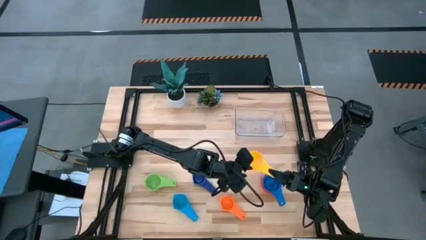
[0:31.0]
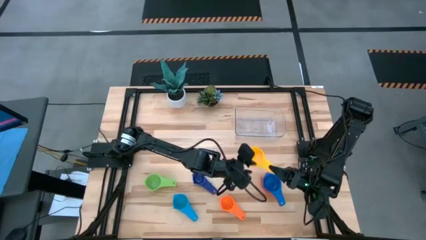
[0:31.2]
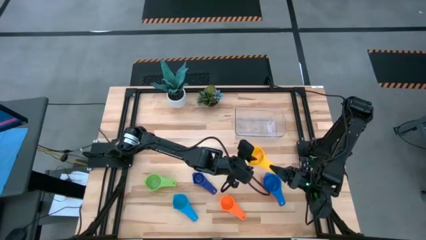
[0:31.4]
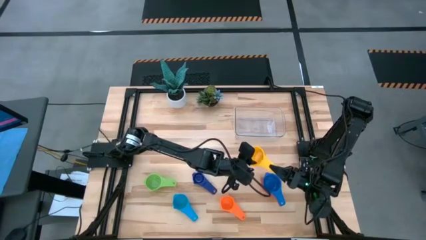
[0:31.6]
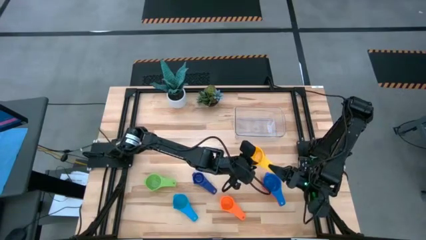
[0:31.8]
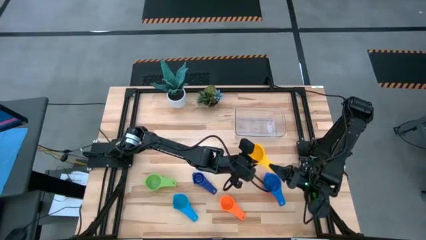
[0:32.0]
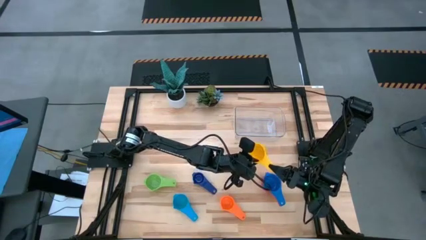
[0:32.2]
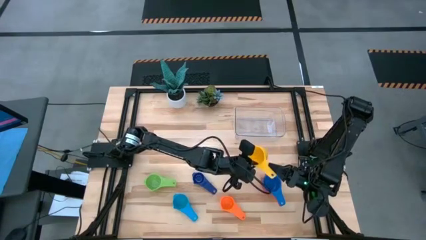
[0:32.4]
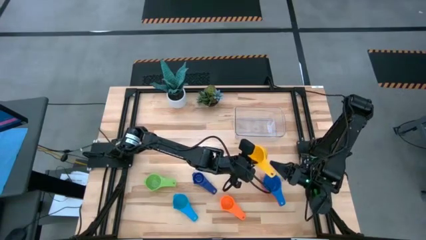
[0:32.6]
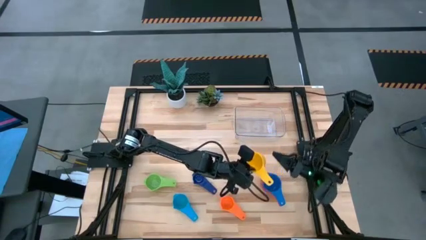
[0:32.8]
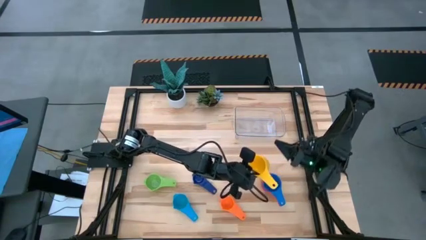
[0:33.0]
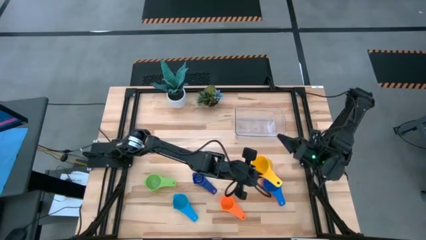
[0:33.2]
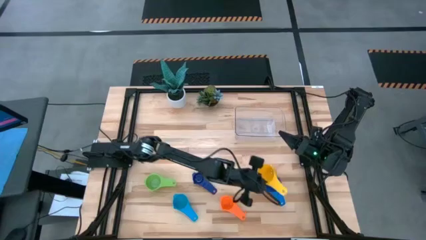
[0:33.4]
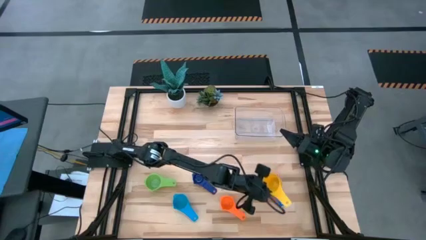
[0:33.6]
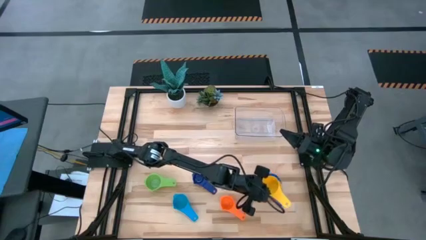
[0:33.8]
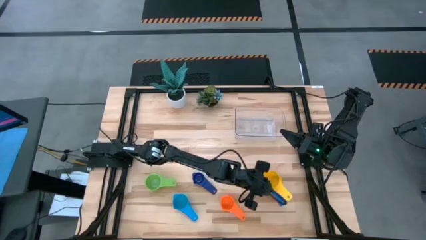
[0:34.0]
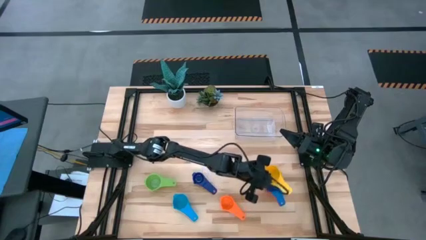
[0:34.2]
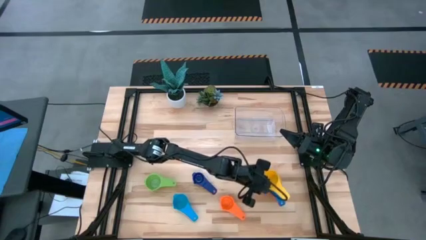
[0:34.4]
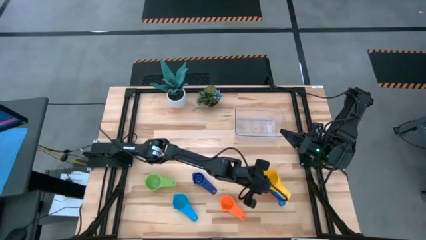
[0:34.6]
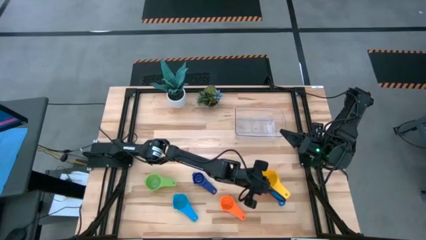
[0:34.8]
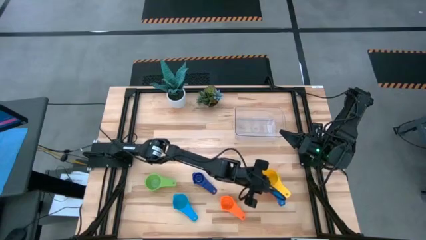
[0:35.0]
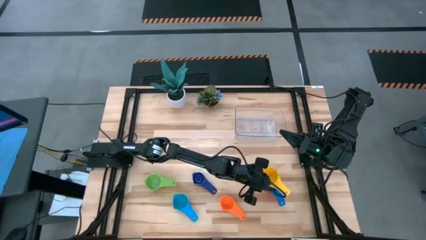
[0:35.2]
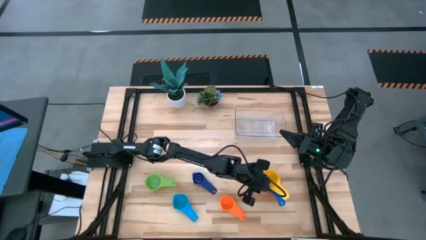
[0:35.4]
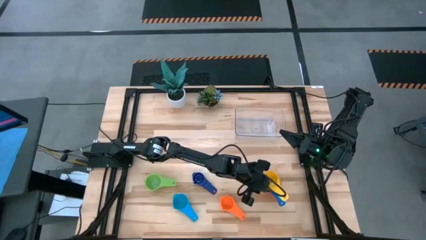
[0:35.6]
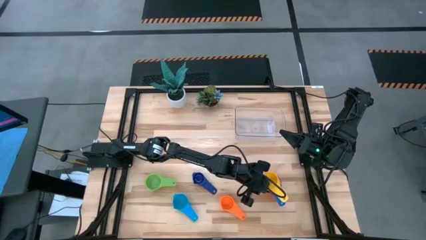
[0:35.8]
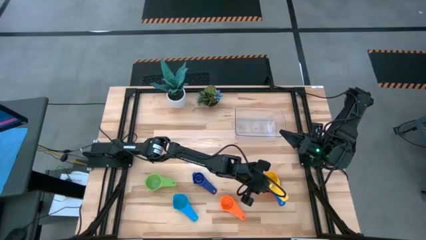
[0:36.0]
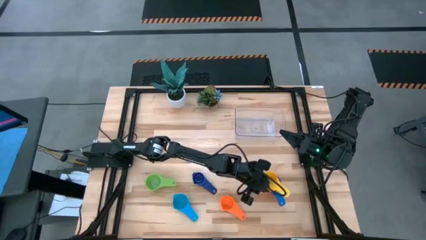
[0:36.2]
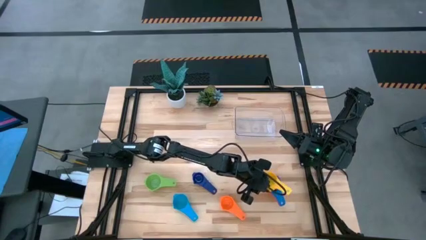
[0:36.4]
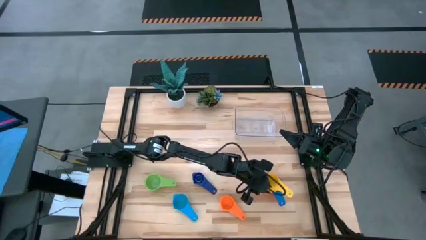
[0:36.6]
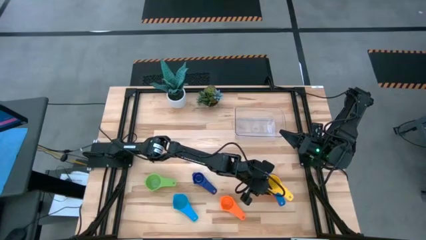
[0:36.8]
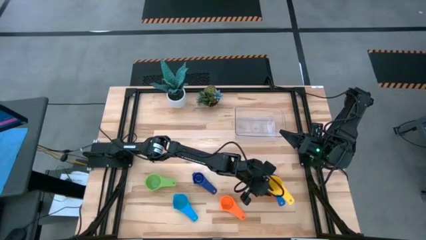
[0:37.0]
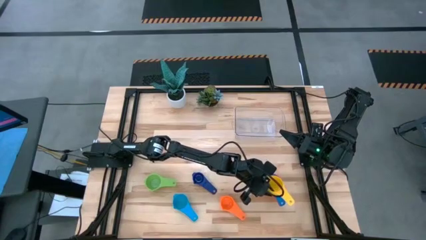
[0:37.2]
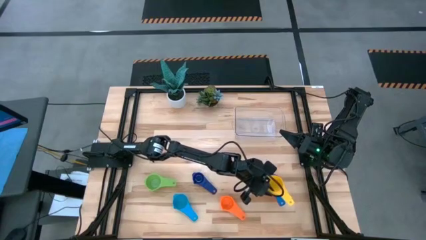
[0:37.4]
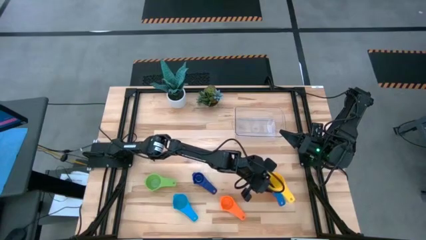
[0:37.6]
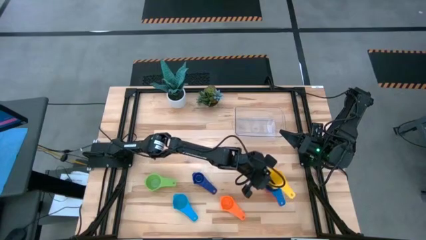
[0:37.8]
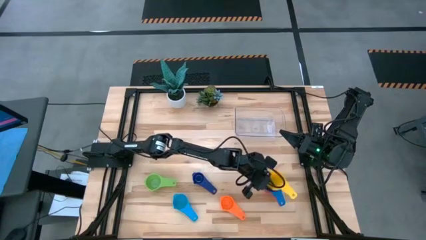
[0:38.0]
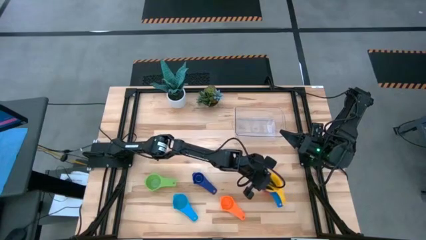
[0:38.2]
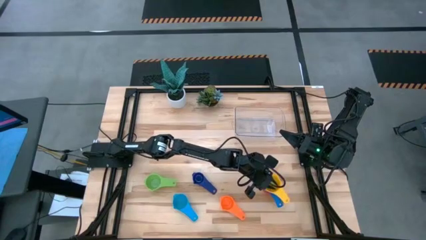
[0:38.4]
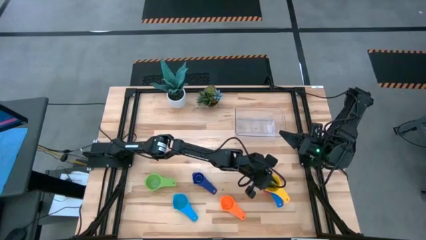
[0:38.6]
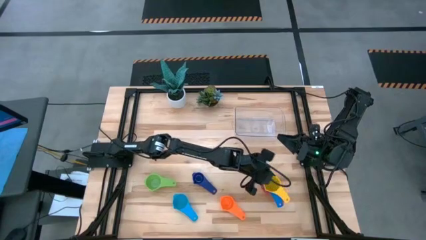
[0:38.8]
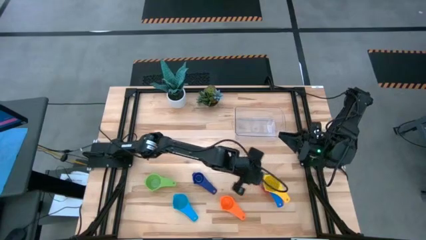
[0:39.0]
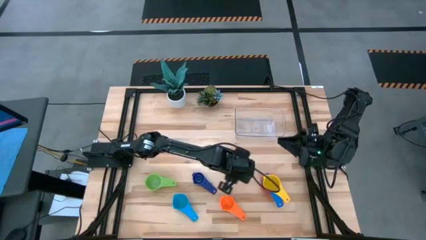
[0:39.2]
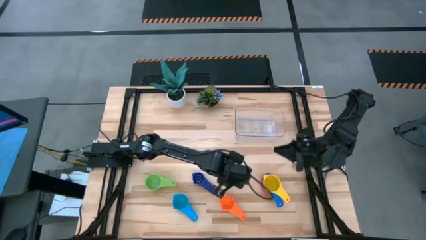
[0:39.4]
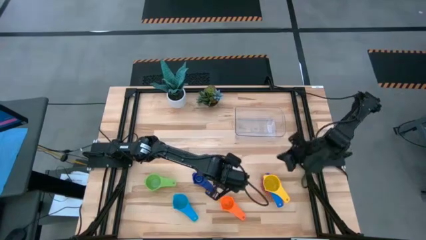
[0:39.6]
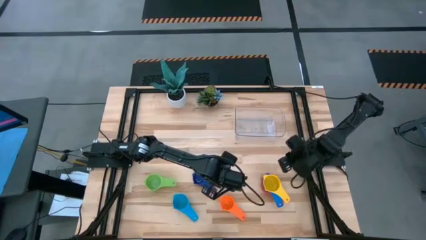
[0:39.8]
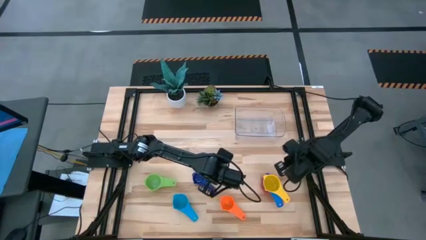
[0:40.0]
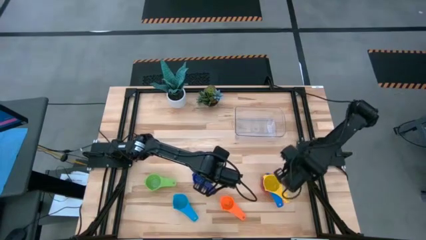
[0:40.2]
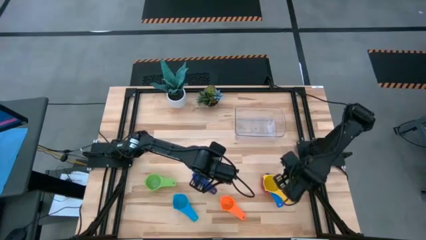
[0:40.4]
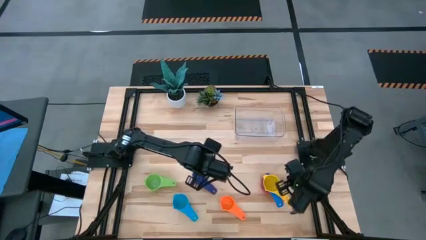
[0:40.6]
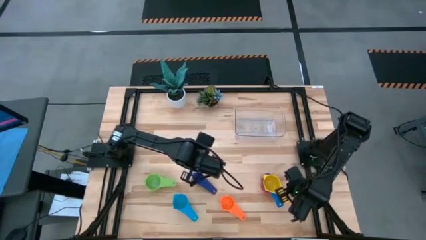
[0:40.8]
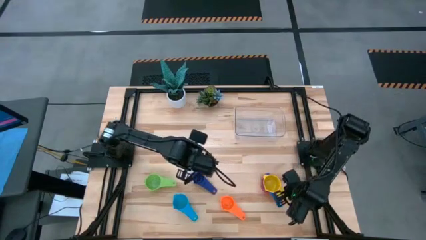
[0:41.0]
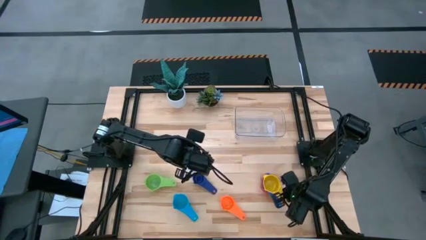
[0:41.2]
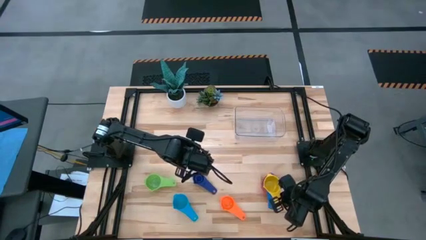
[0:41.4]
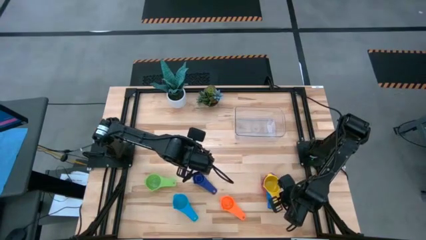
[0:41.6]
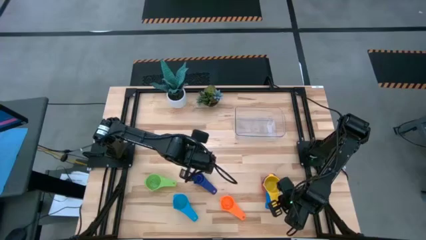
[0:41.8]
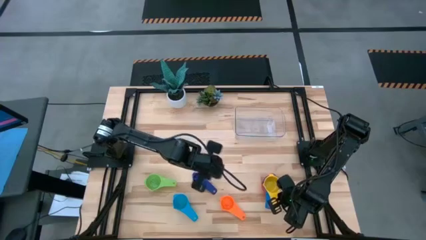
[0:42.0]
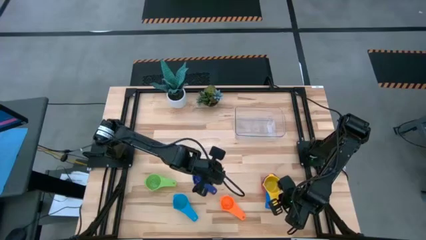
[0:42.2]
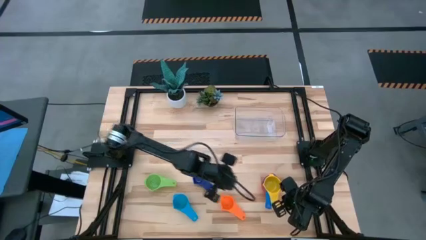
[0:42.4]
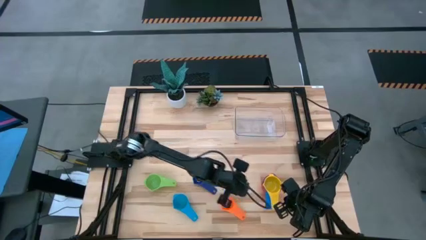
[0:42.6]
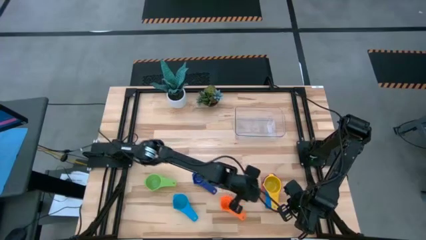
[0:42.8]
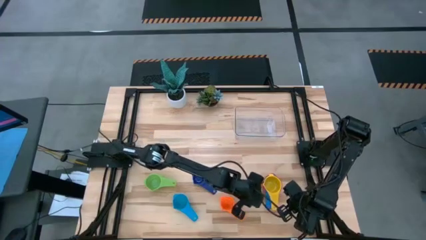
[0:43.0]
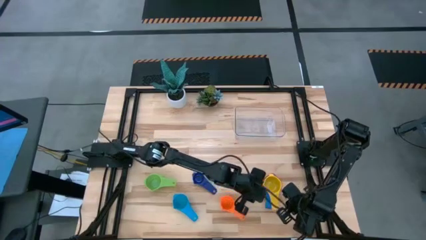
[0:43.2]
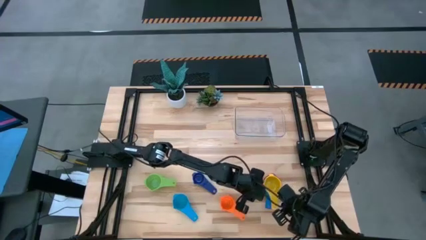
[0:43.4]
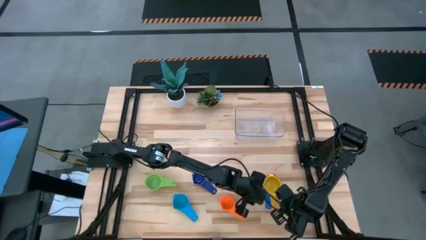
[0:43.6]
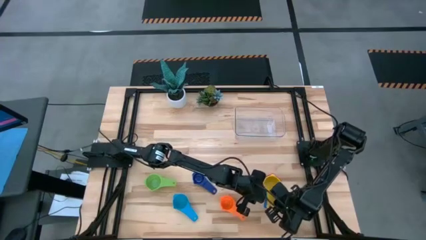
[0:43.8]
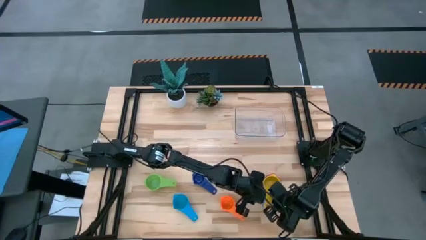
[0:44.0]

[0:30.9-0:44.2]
Task: Nest measuring cups in basket
Stack the yellow nest measuring cup on the blue nest measuring cup

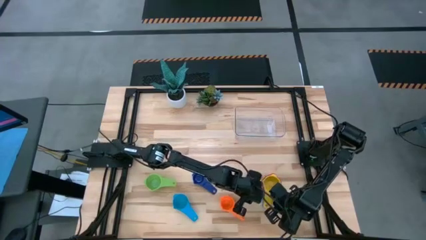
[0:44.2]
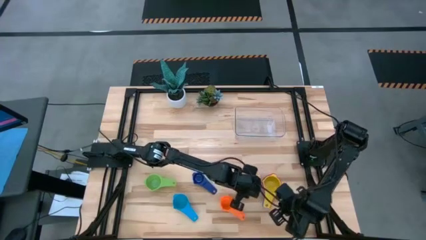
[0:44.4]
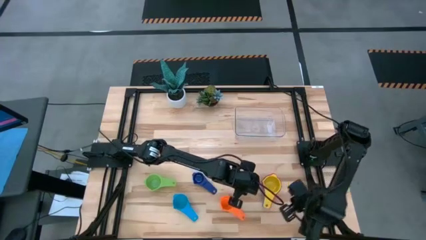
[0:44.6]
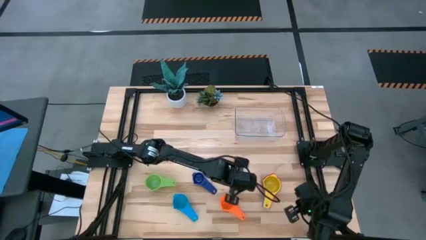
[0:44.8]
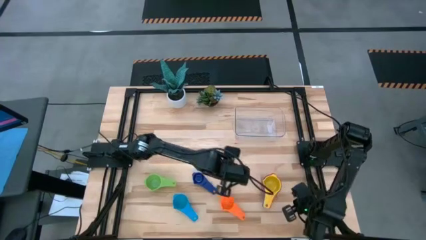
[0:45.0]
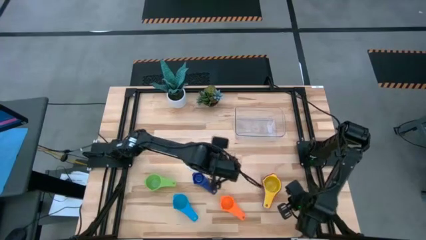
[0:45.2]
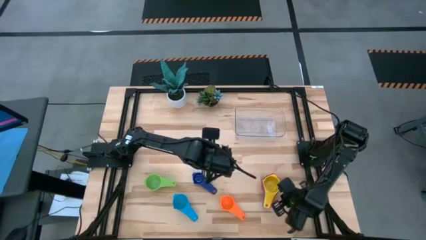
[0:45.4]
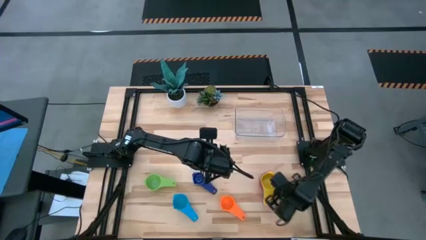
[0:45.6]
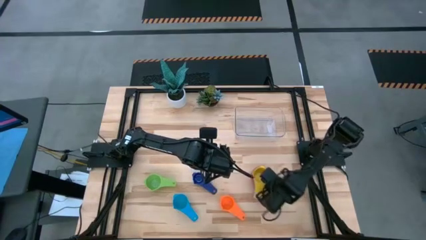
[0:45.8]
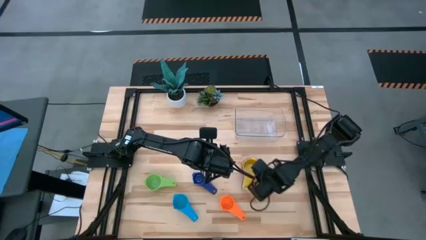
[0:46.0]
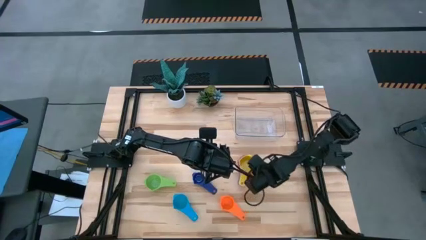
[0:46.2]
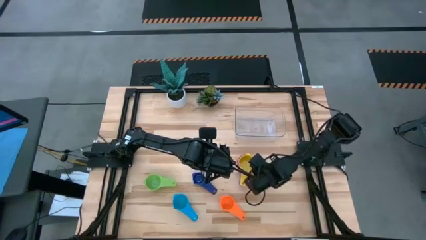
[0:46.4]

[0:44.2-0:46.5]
Move the stacked measuring cups to the center of the table

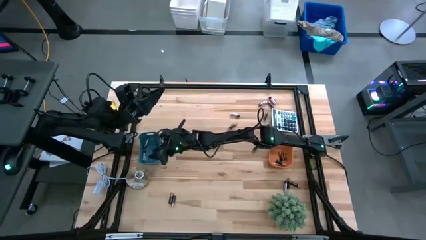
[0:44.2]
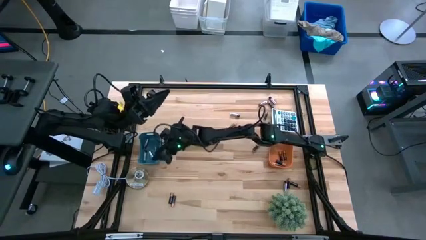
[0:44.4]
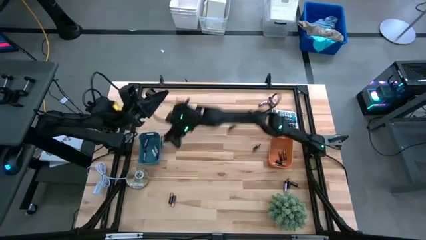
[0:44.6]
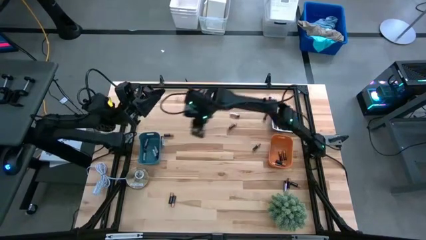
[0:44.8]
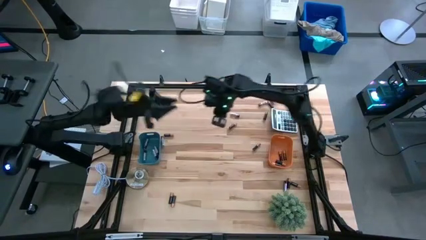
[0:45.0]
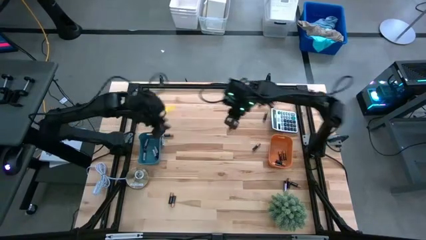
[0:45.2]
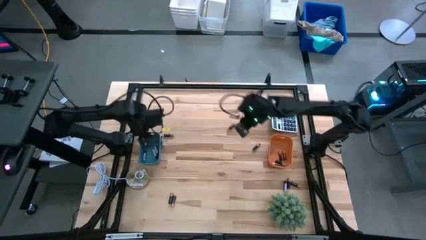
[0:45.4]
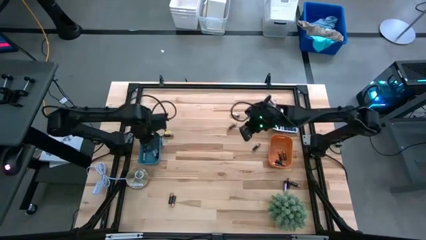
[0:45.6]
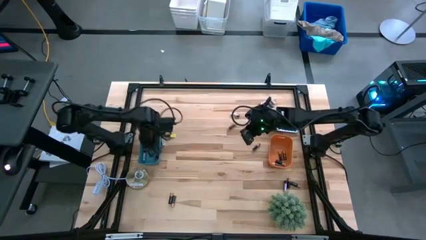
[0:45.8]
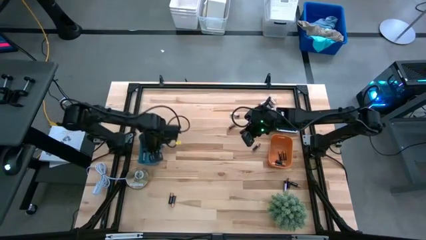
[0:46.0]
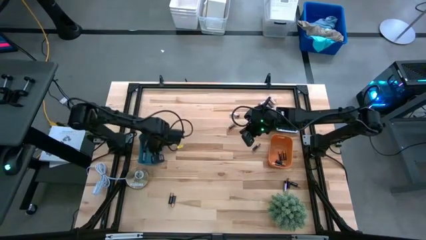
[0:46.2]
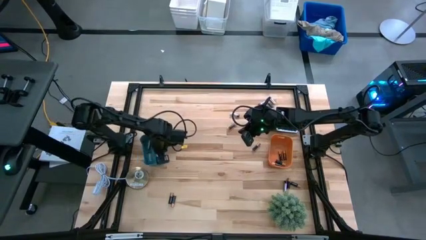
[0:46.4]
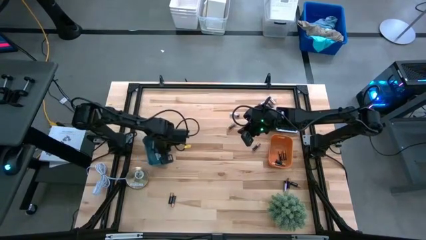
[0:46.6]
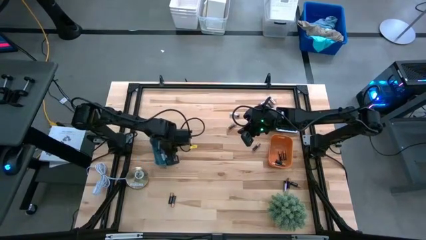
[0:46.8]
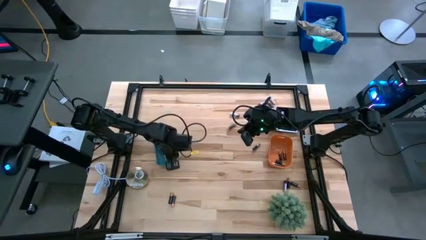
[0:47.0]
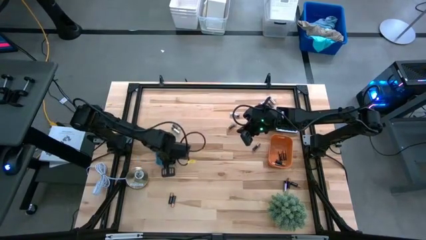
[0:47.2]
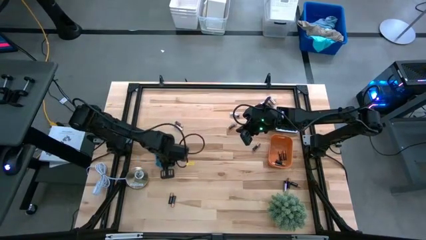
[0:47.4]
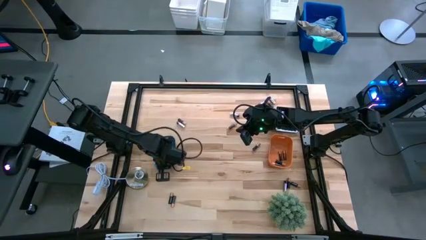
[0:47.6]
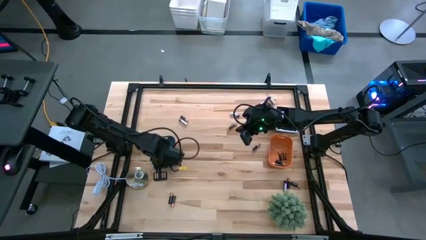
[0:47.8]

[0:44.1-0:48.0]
Task: Sort batteries
Adjust the blue bin
